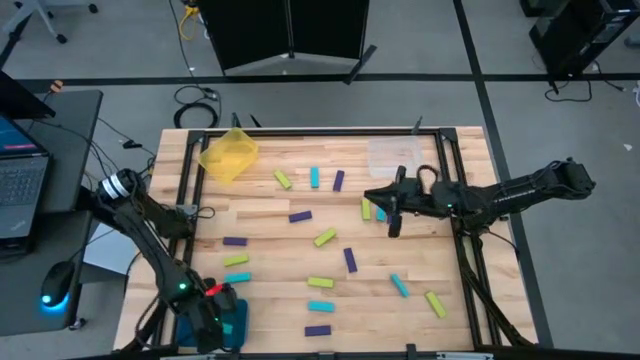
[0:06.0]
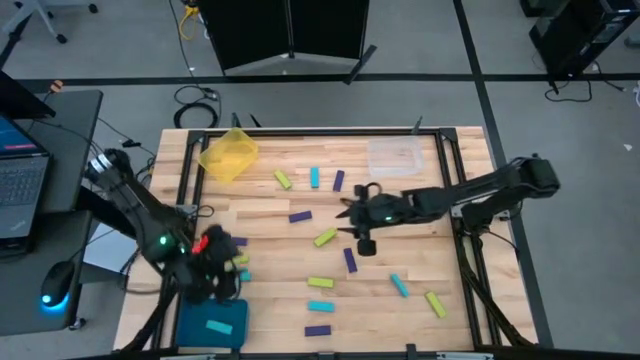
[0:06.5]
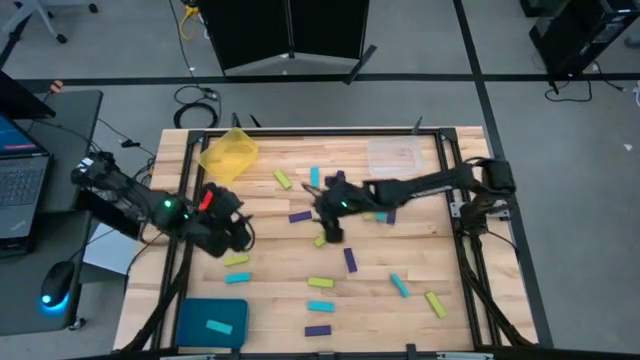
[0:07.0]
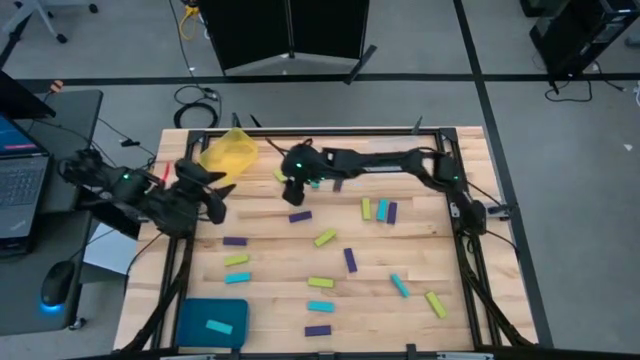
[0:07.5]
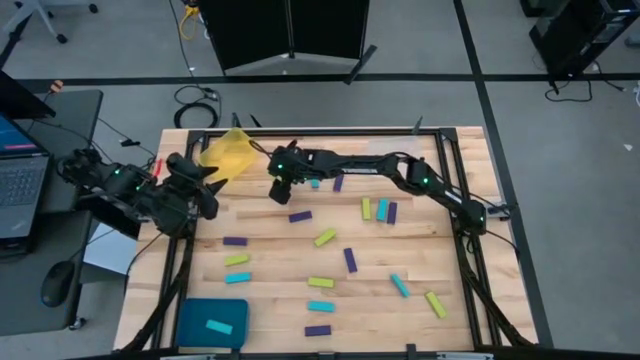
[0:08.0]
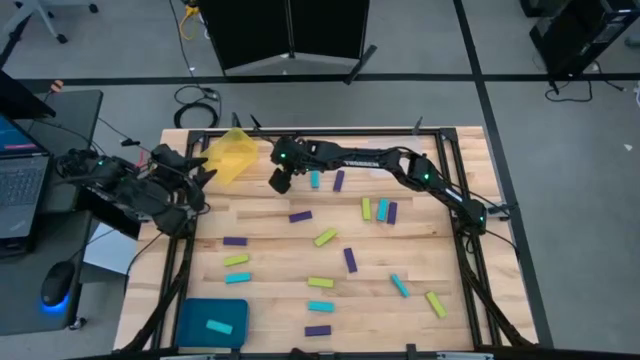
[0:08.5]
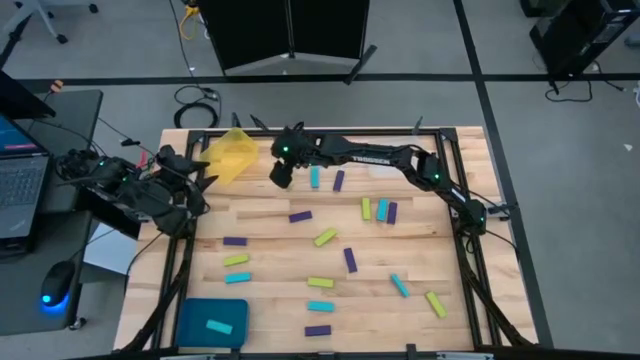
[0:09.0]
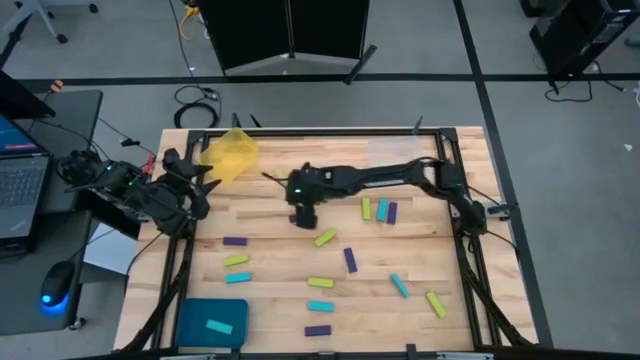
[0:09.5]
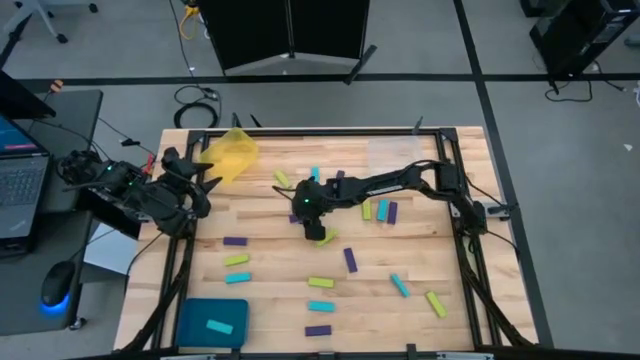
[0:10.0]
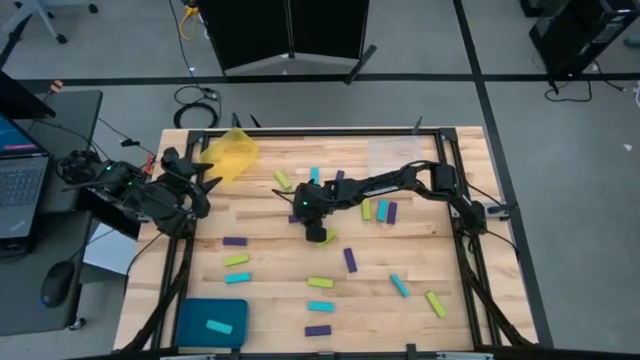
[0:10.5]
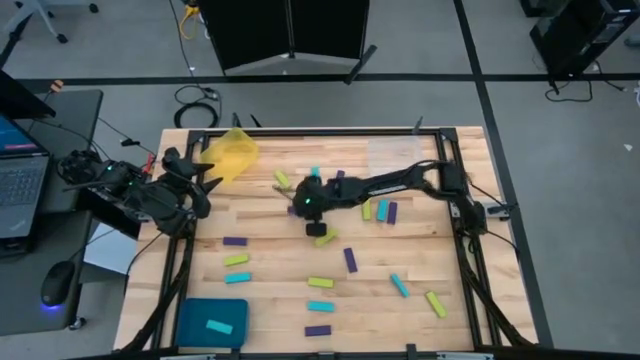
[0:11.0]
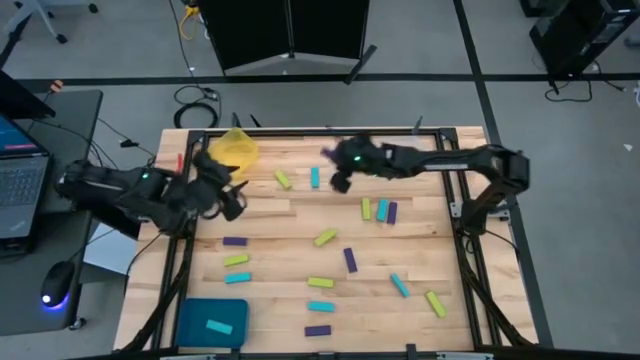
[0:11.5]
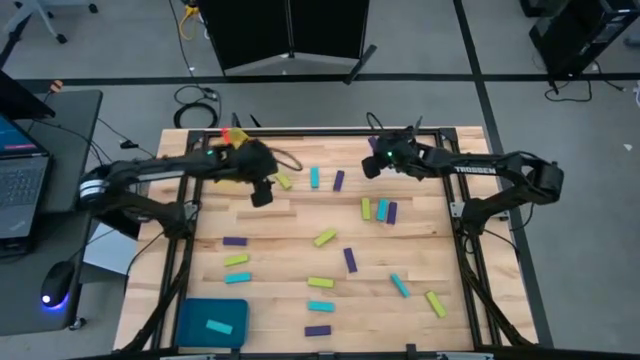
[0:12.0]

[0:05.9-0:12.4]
Task: Sort blocks
Put the purple block into the white transparent bin

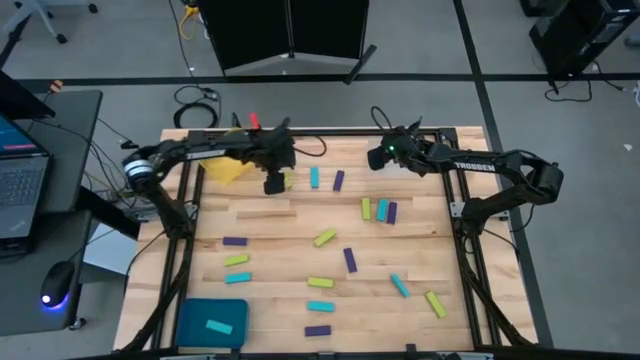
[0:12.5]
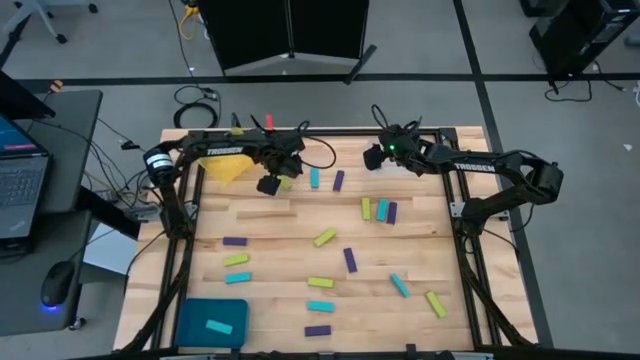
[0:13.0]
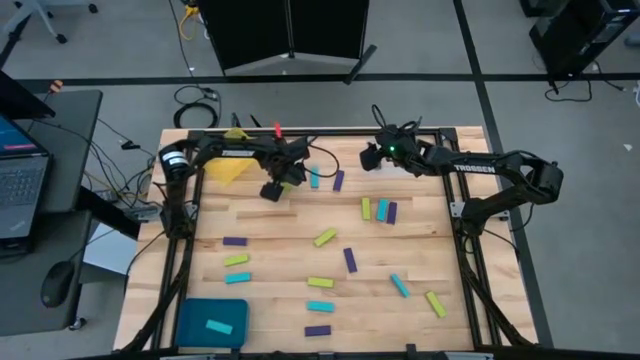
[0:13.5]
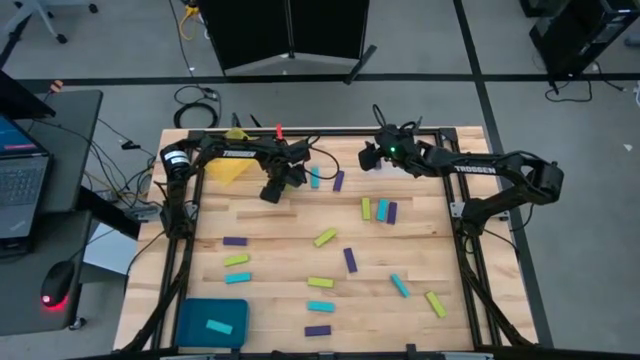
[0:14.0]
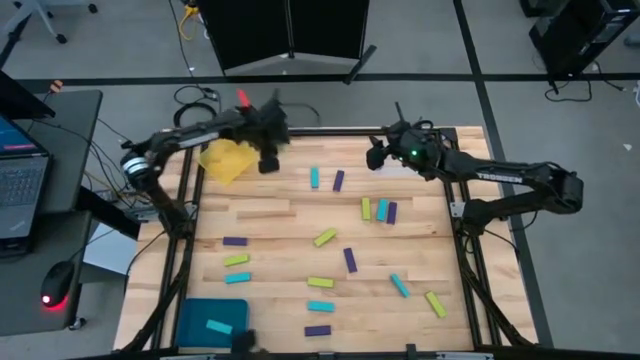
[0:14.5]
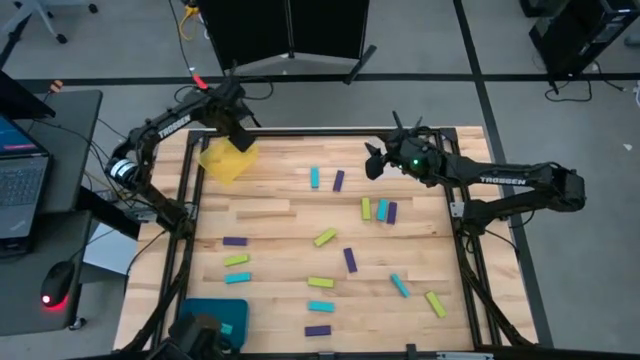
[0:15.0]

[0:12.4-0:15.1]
Put the light green block into the yellow transparent bin

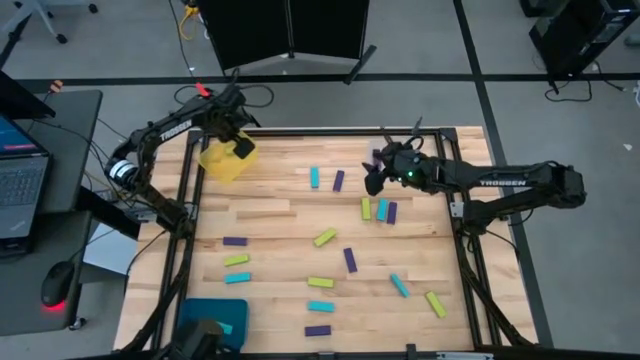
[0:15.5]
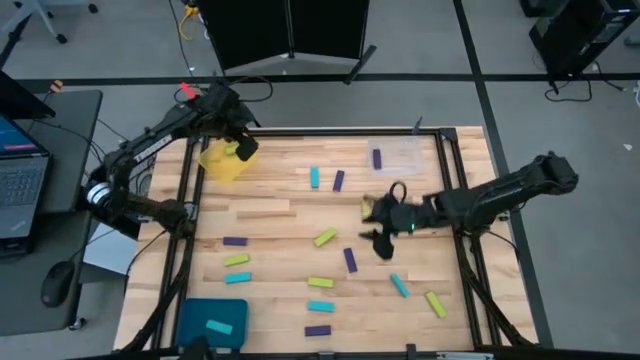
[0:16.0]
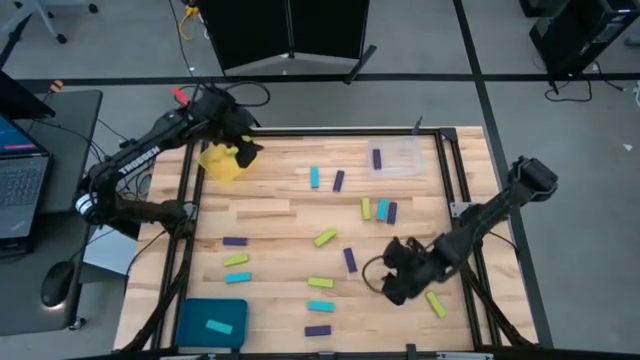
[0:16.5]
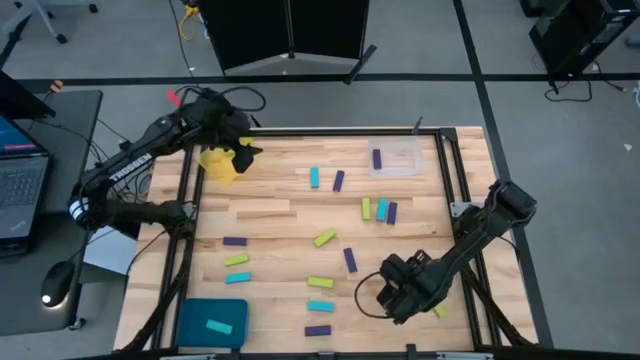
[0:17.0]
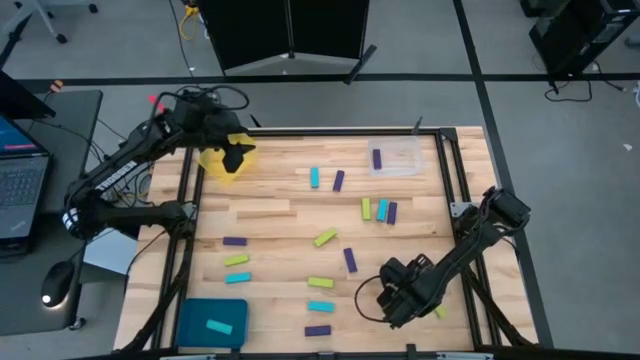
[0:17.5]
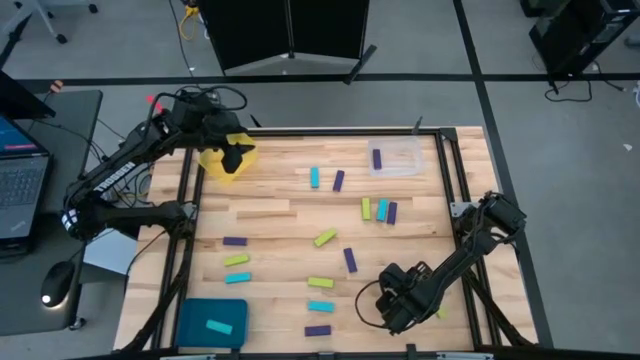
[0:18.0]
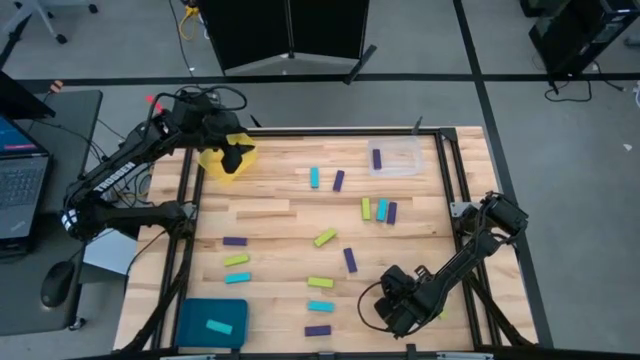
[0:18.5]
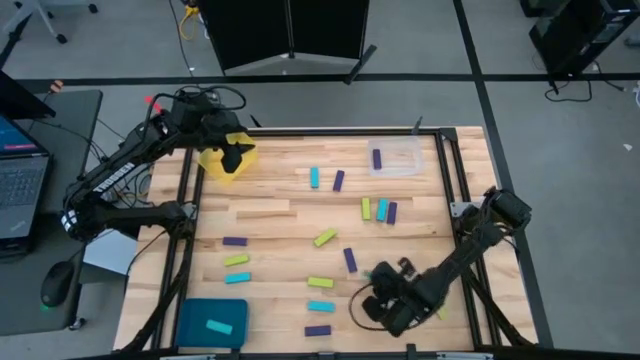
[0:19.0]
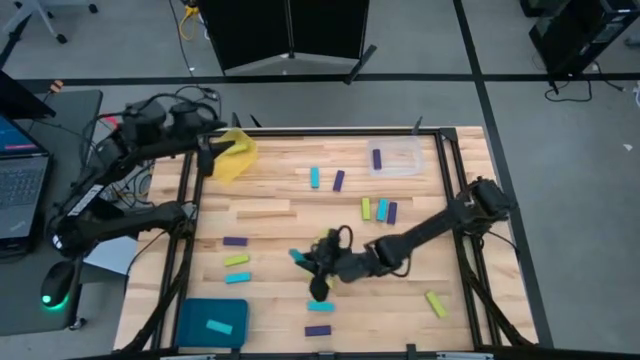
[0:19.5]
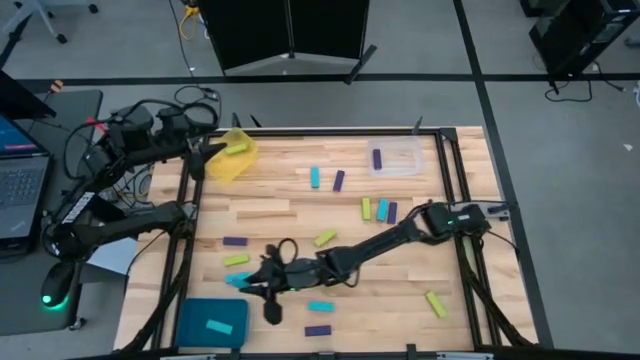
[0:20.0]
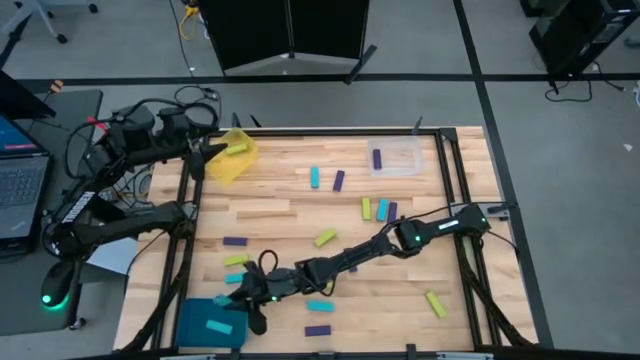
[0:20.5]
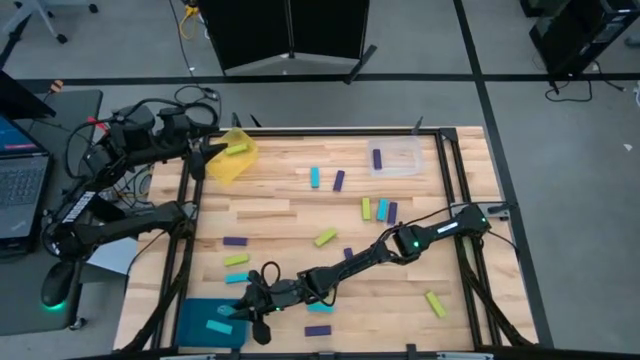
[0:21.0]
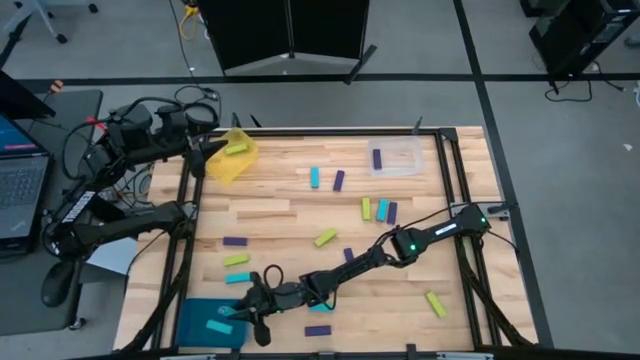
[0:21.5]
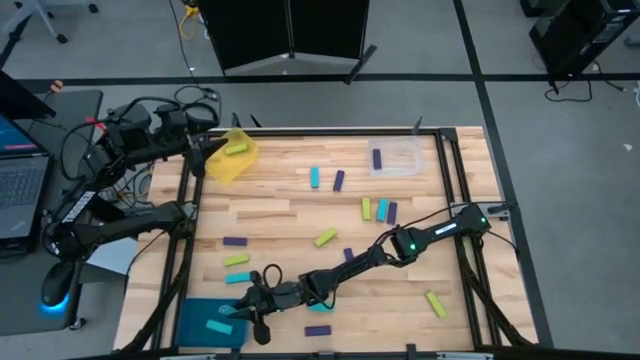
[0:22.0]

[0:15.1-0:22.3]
Put the light blue block into the blue bin

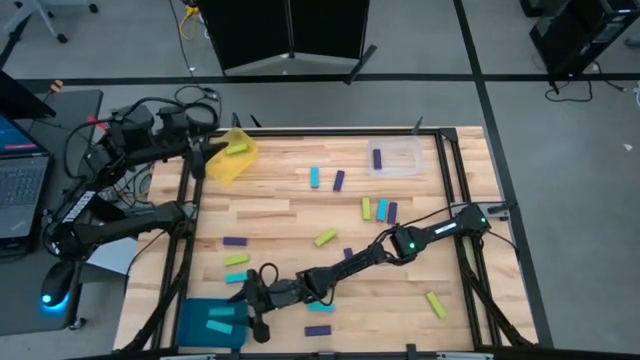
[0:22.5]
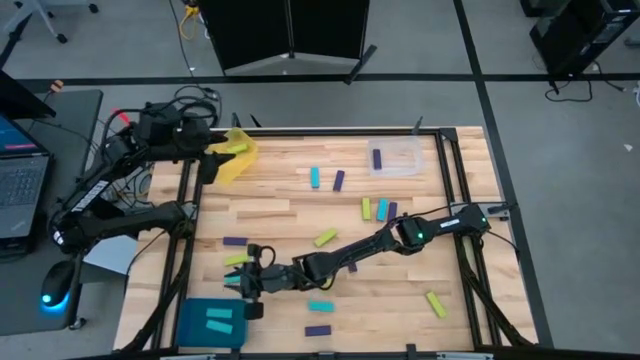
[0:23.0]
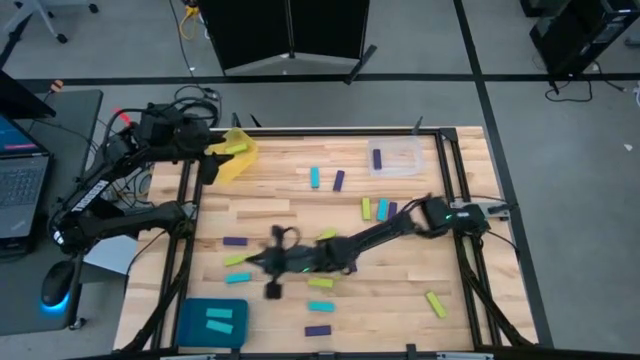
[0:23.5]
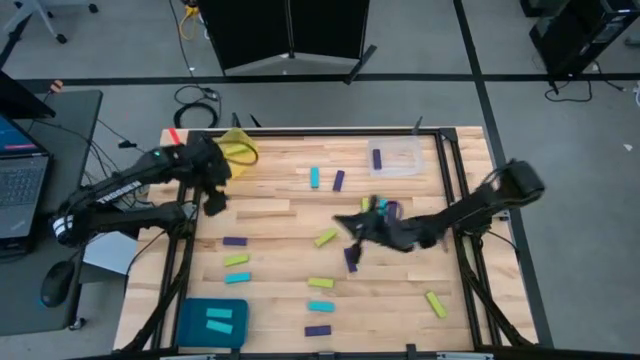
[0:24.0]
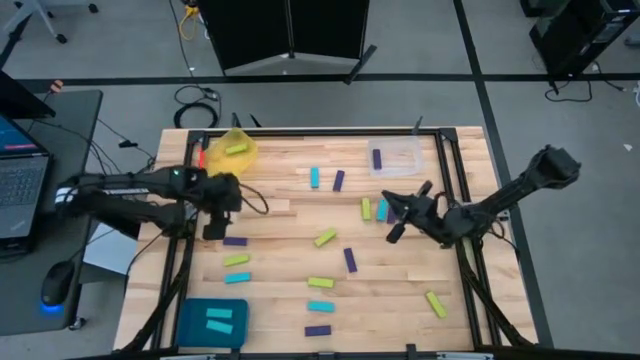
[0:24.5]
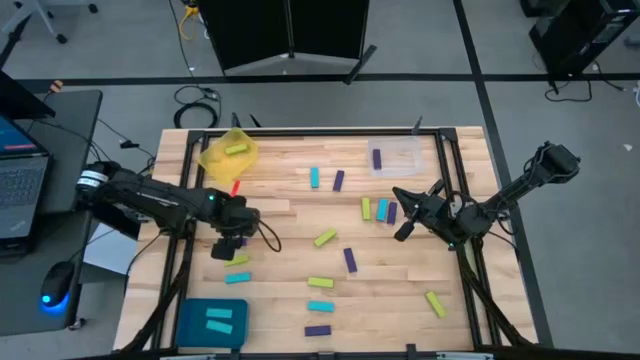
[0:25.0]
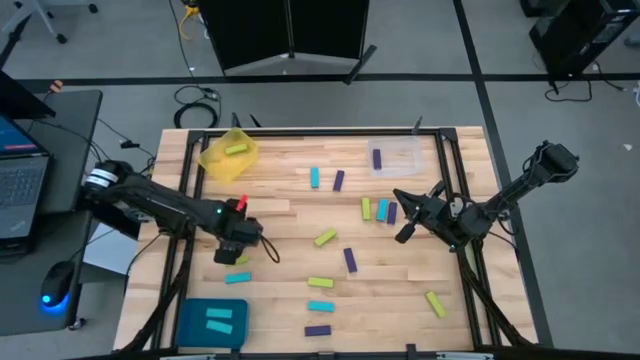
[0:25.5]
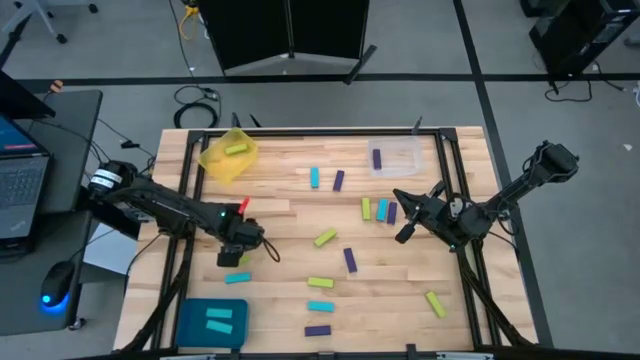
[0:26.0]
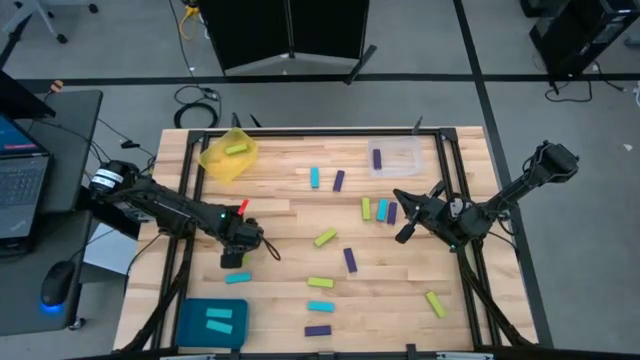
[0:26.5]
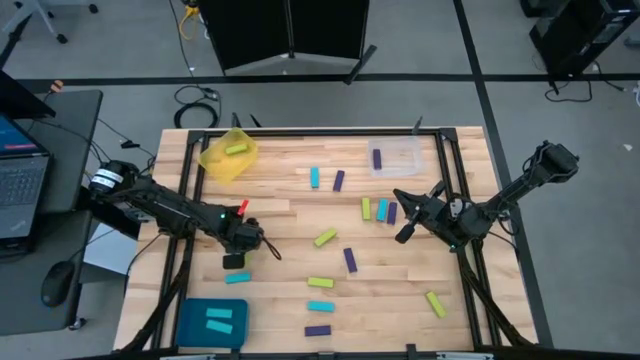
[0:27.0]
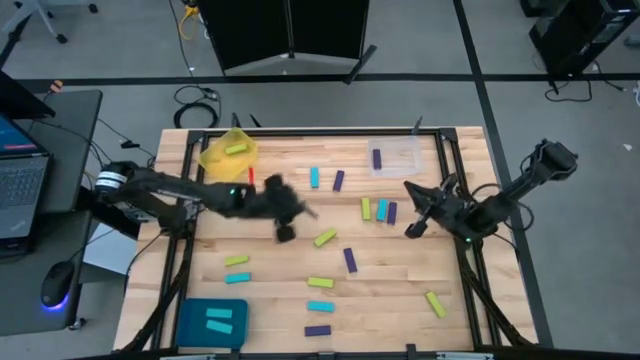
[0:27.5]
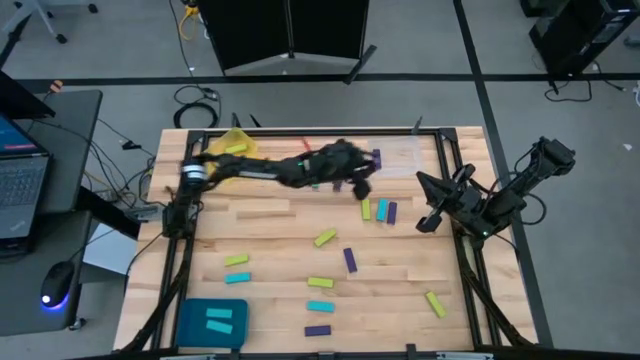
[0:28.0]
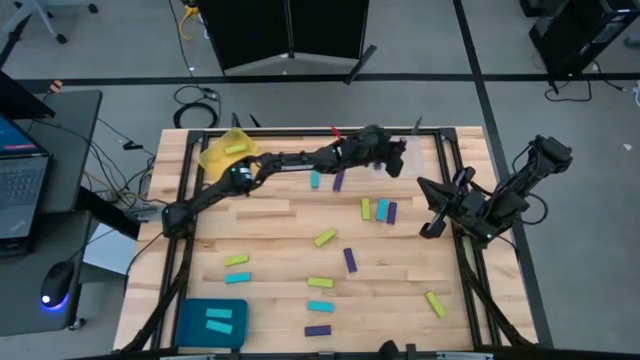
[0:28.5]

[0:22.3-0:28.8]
Put the purple block into the white transparent bin
